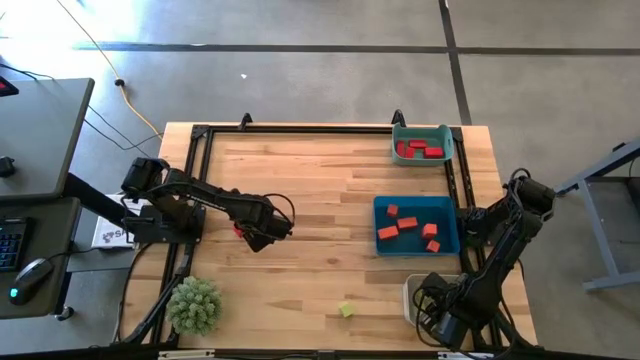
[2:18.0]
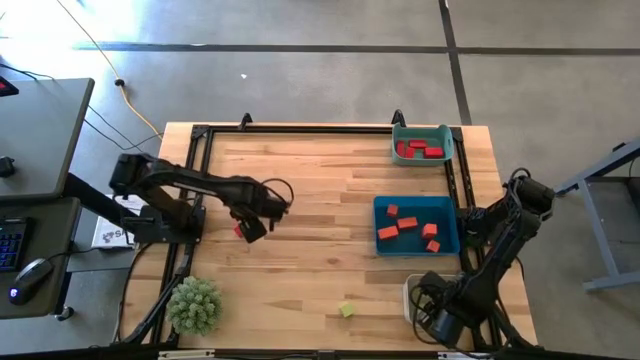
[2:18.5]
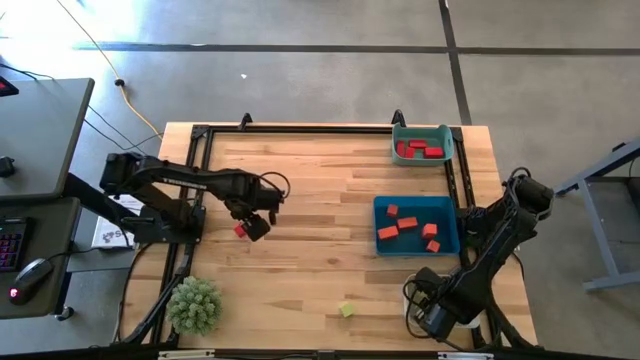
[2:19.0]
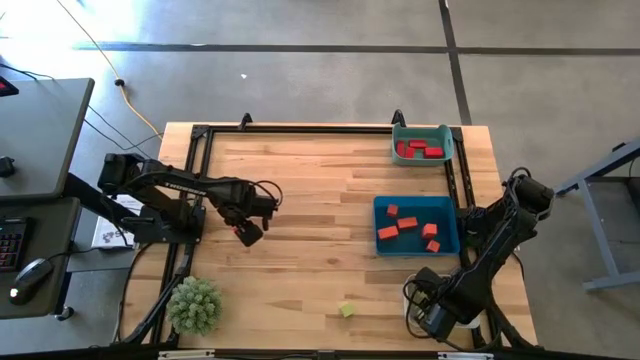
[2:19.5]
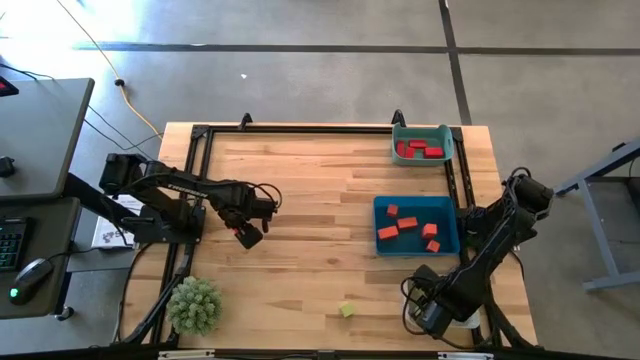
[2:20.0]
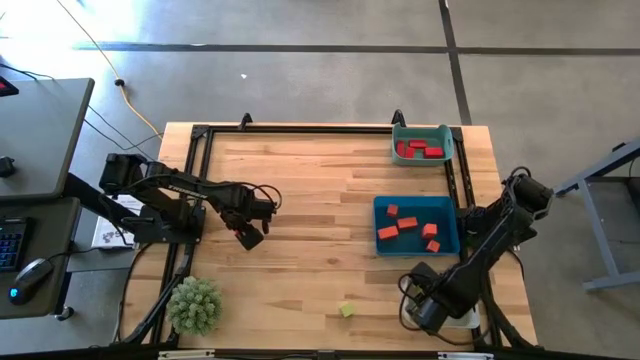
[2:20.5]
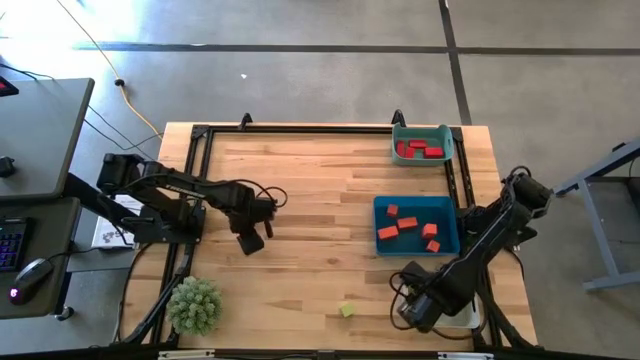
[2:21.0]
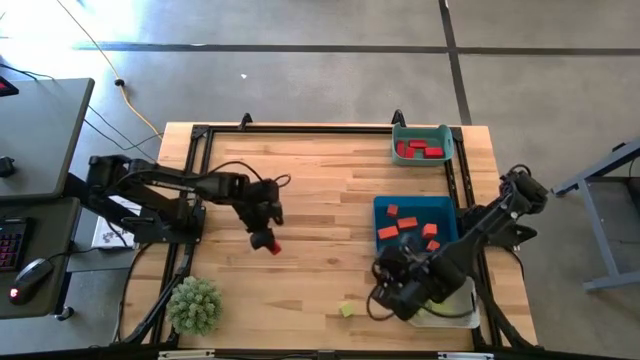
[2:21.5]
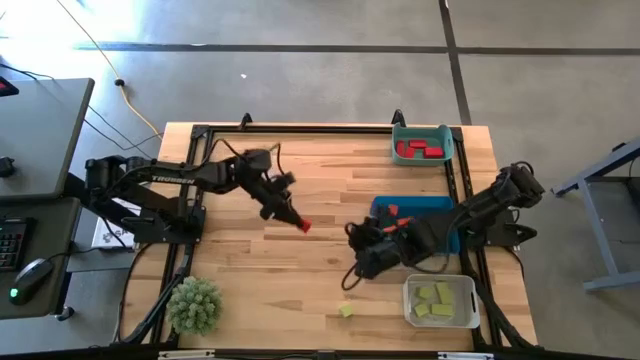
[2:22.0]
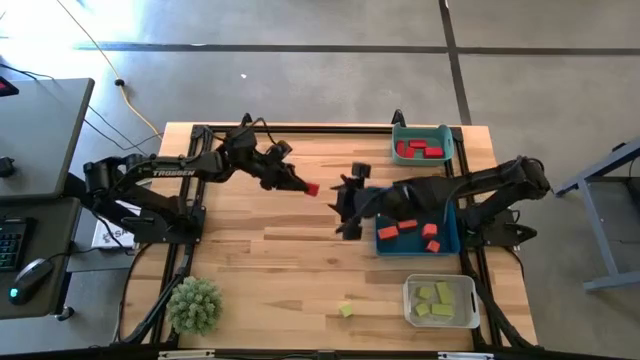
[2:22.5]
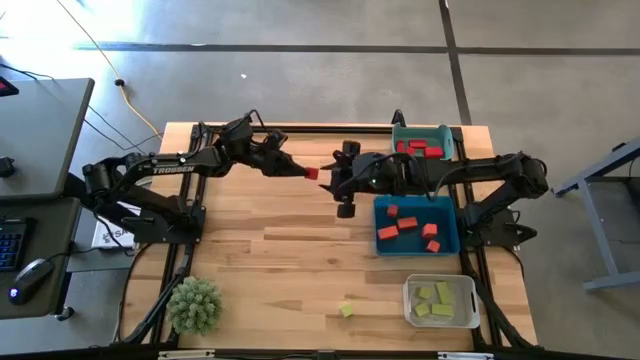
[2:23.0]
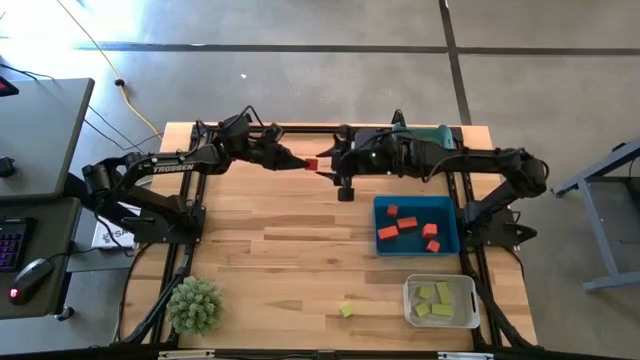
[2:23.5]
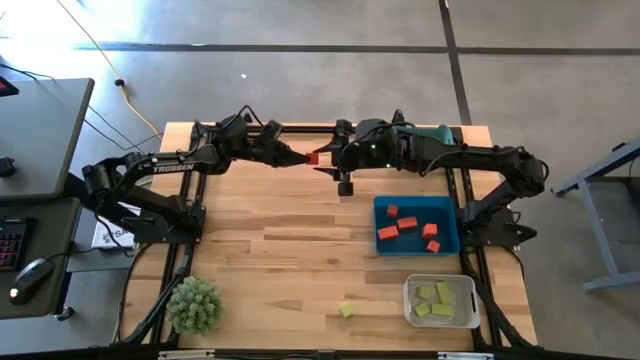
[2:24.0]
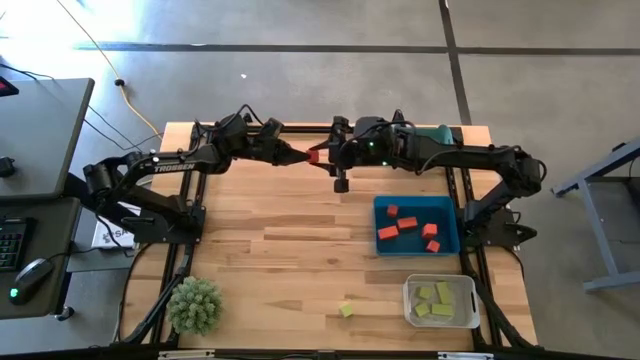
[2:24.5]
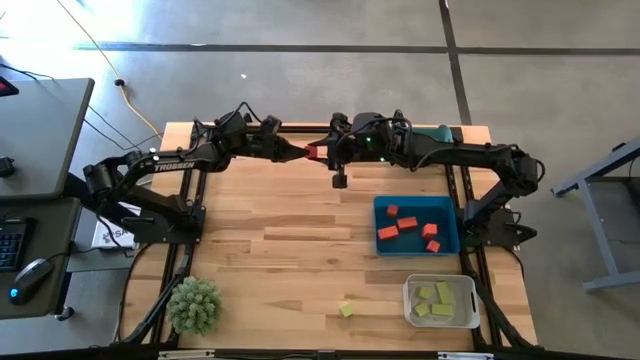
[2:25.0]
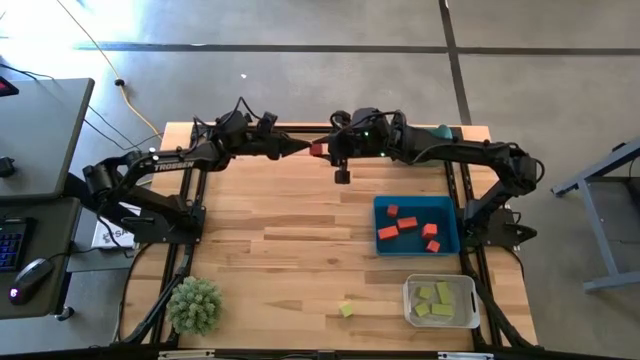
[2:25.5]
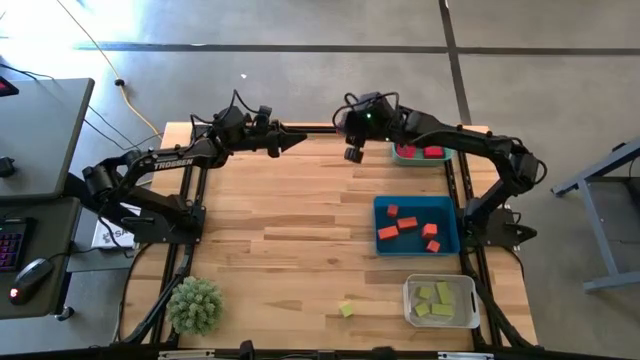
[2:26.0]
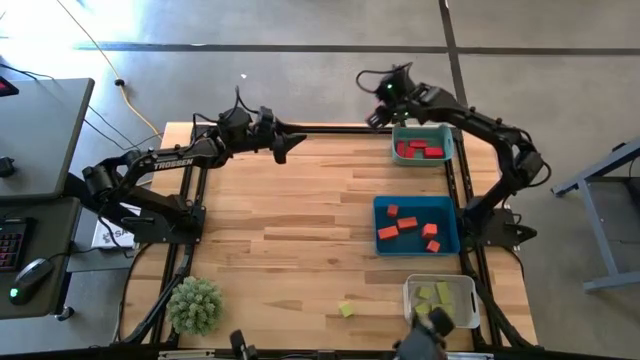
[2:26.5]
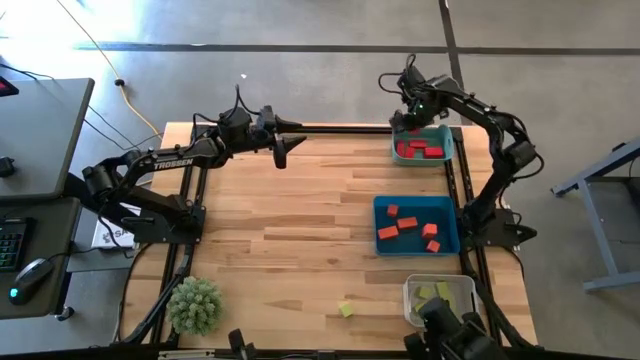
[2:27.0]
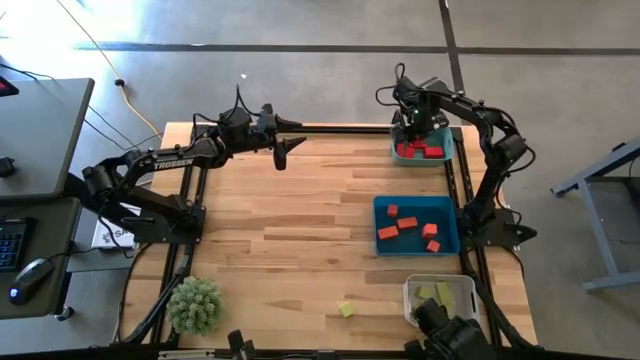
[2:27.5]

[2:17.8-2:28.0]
Task: Sort & place blocks by color
Put the red wooden block into the green bin

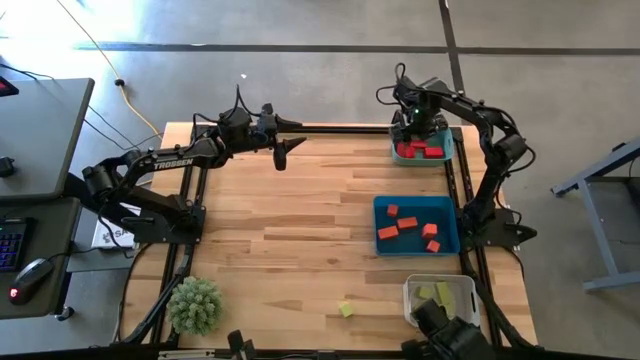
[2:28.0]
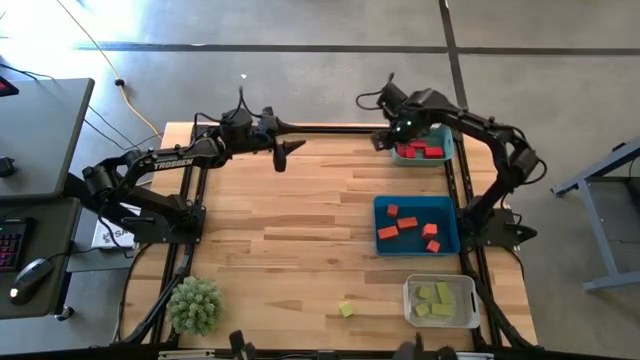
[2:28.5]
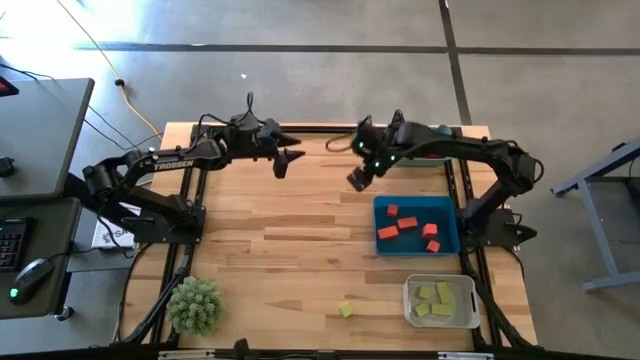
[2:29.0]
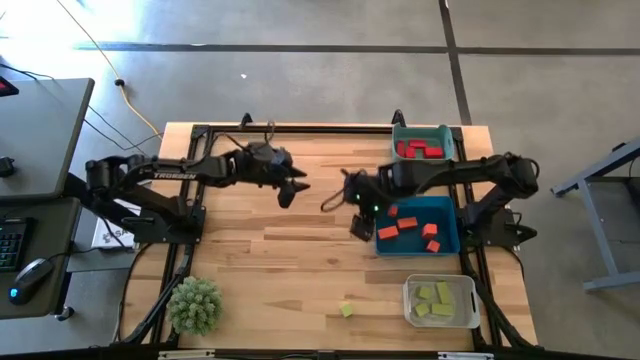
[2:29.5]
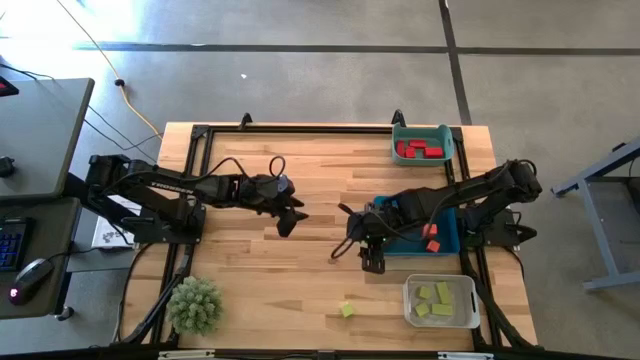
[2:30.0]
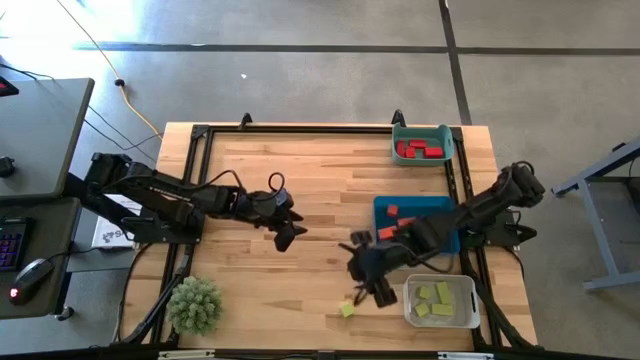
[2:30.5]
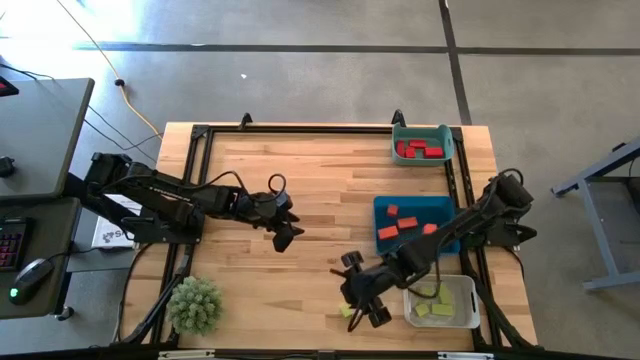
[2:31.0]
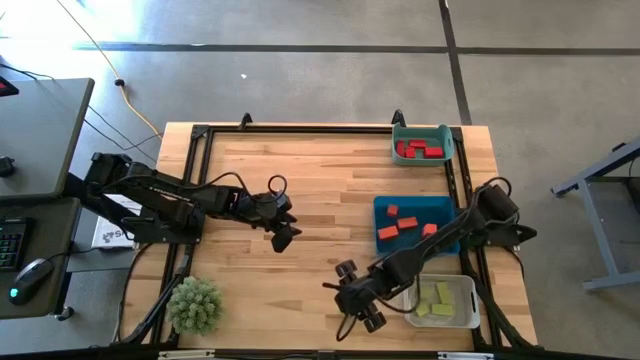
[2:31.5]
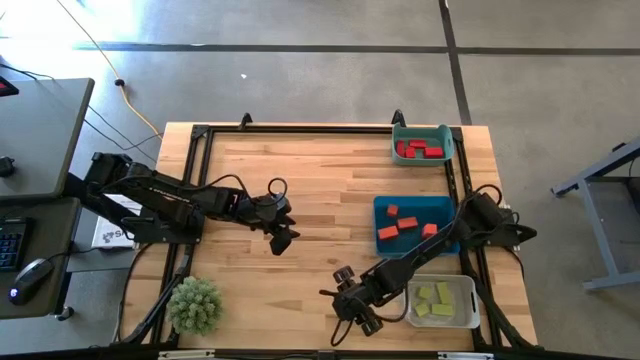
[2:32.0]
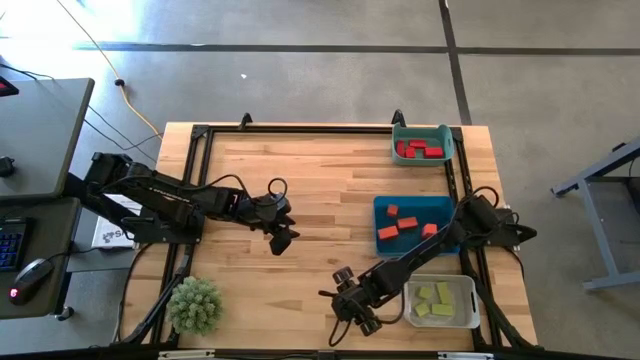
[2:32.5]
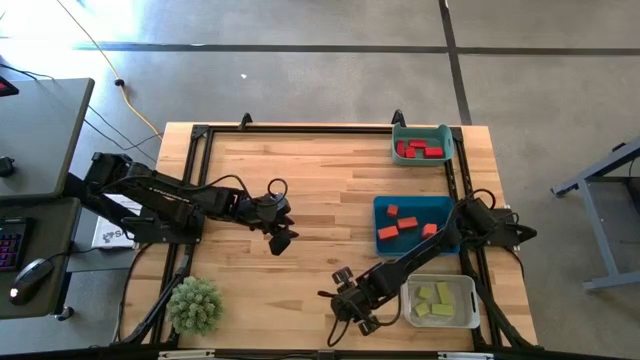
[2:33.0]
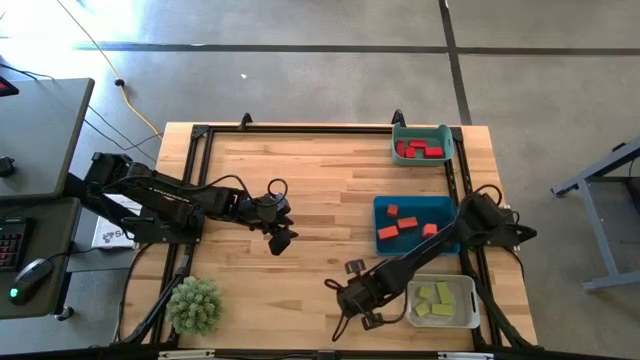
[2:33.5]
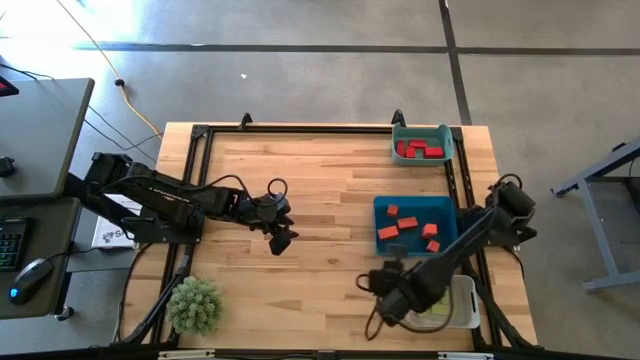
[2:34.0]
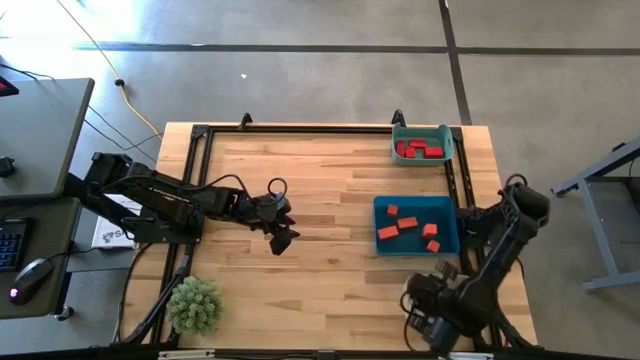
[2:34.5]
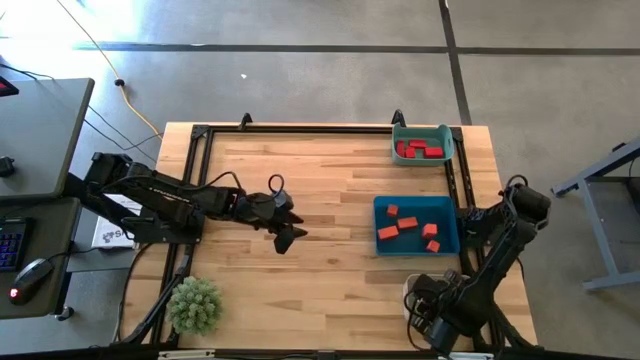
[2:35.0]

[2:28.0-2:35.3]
Put the green wooden block into the white bin
